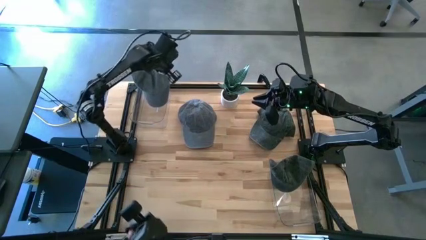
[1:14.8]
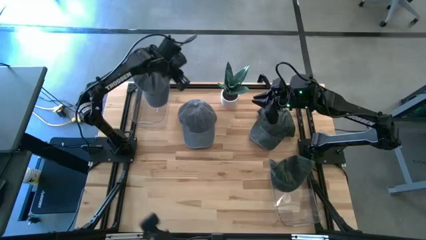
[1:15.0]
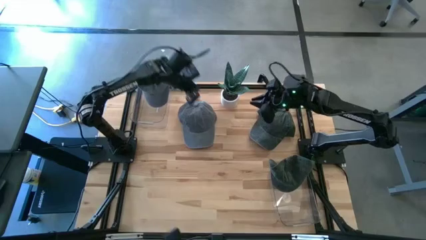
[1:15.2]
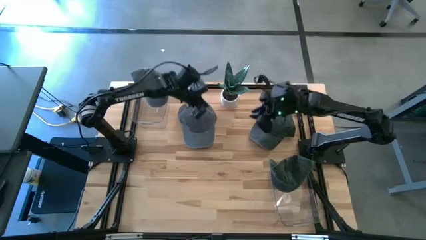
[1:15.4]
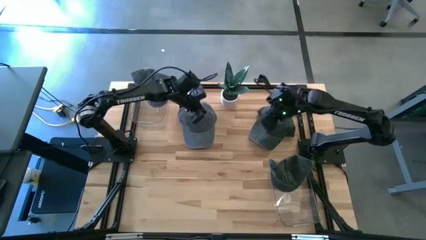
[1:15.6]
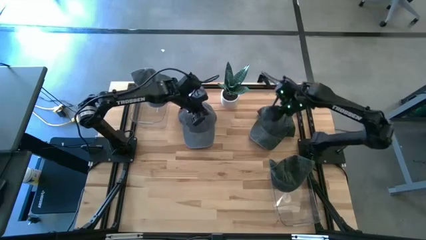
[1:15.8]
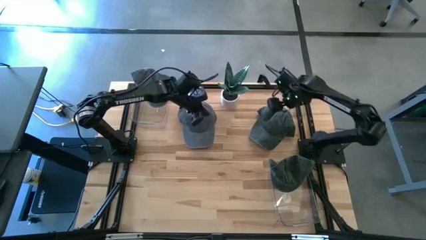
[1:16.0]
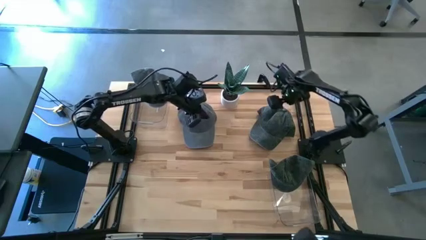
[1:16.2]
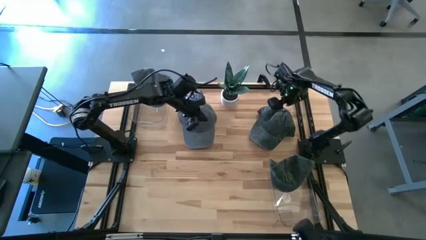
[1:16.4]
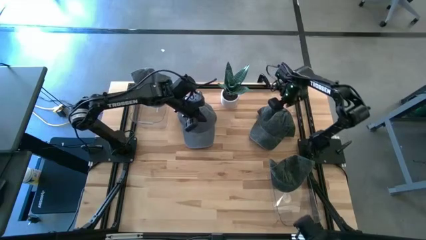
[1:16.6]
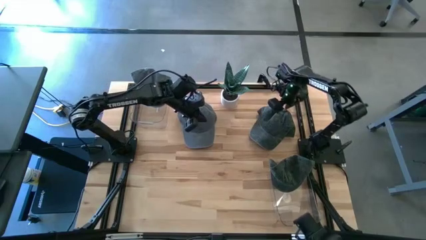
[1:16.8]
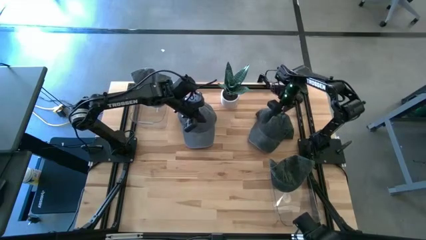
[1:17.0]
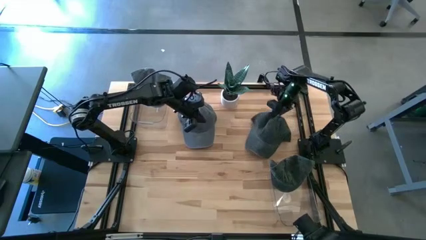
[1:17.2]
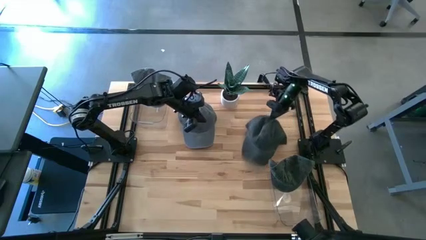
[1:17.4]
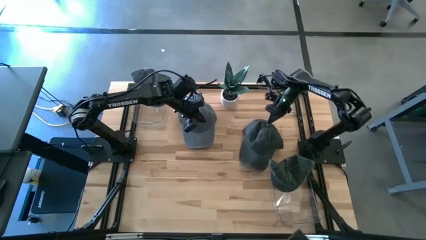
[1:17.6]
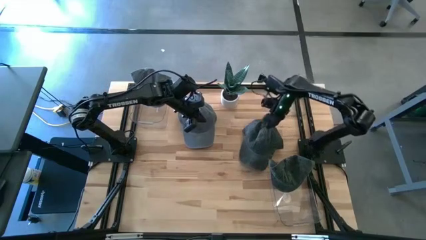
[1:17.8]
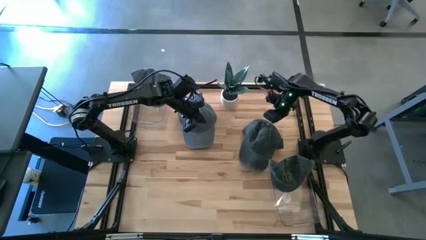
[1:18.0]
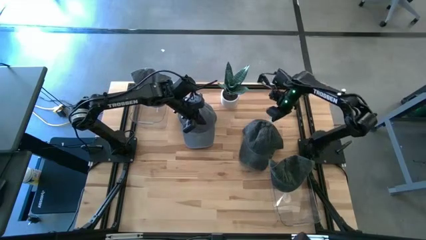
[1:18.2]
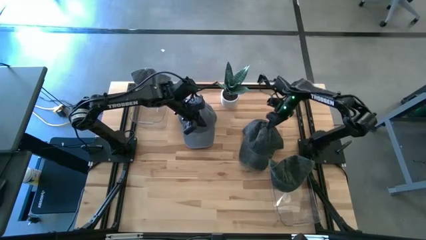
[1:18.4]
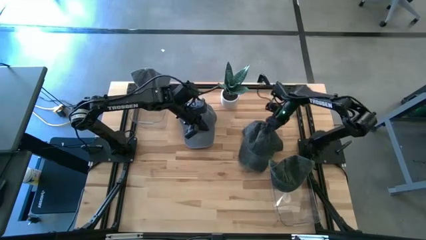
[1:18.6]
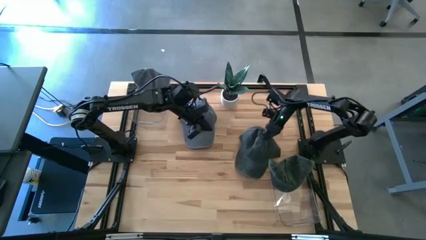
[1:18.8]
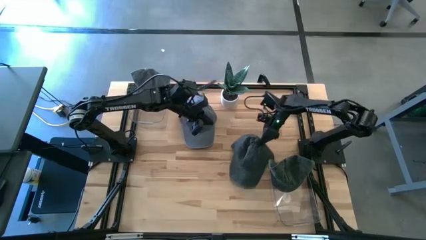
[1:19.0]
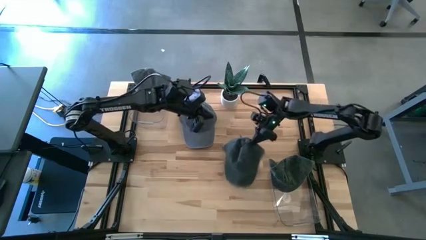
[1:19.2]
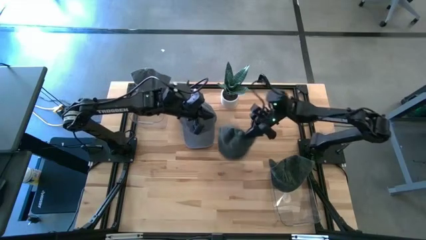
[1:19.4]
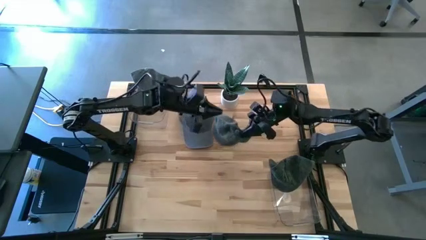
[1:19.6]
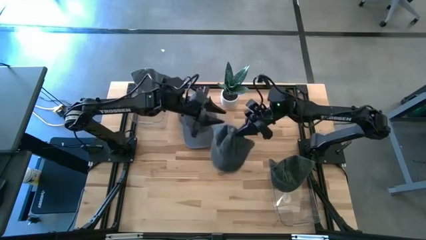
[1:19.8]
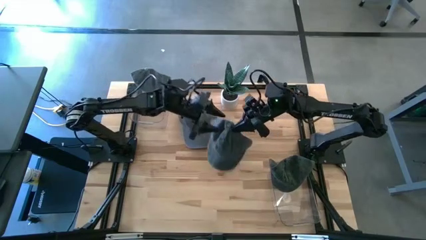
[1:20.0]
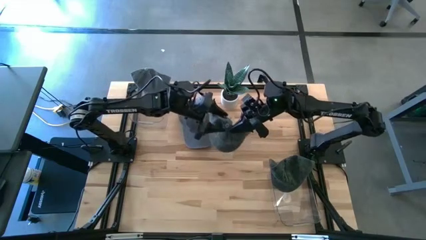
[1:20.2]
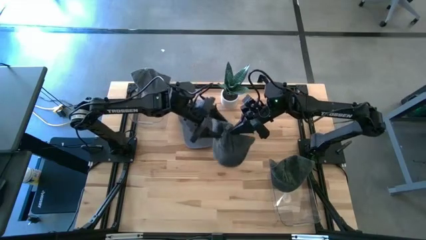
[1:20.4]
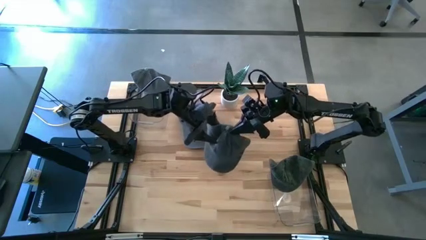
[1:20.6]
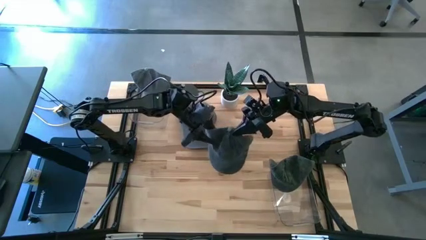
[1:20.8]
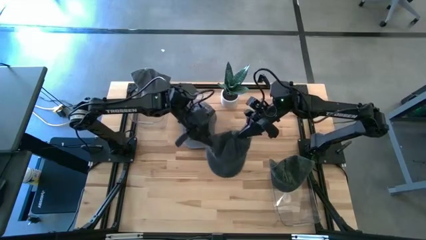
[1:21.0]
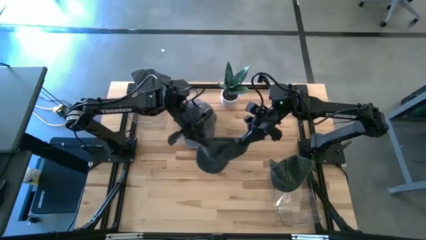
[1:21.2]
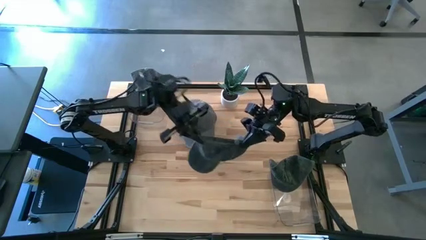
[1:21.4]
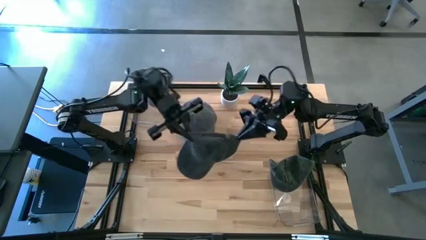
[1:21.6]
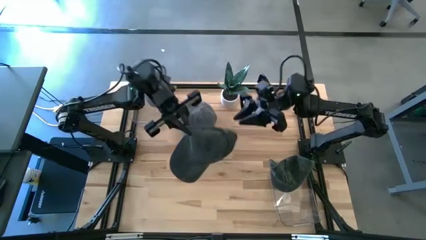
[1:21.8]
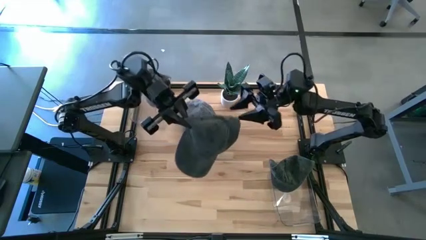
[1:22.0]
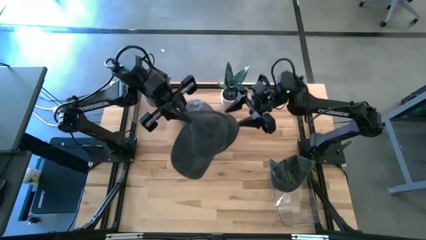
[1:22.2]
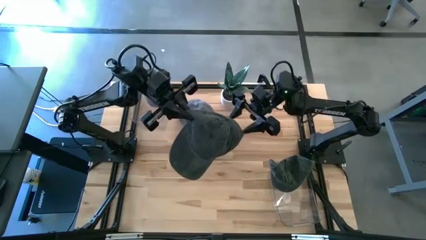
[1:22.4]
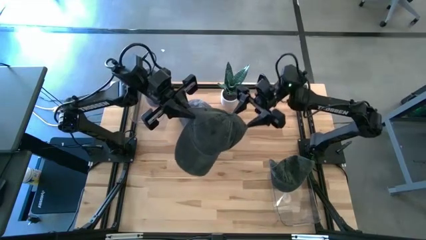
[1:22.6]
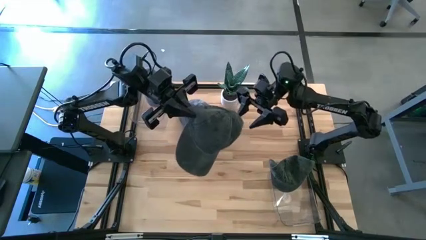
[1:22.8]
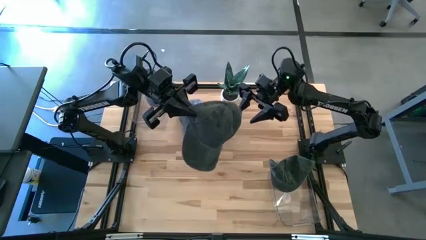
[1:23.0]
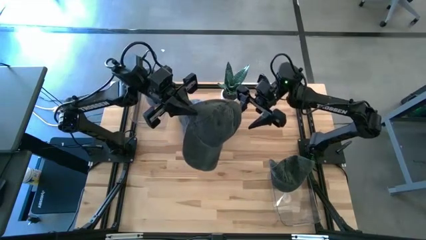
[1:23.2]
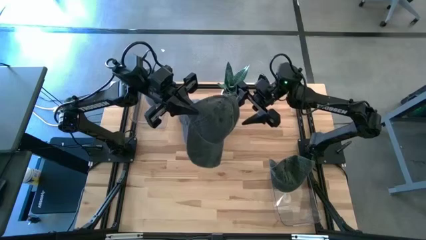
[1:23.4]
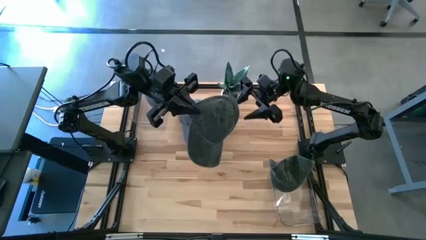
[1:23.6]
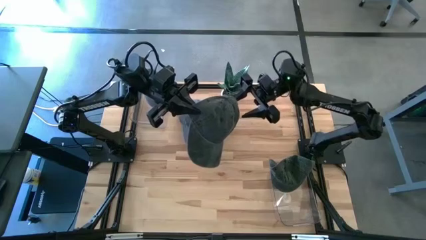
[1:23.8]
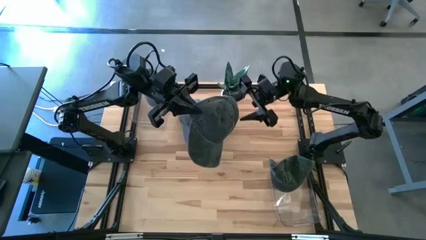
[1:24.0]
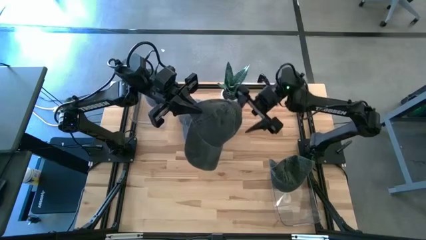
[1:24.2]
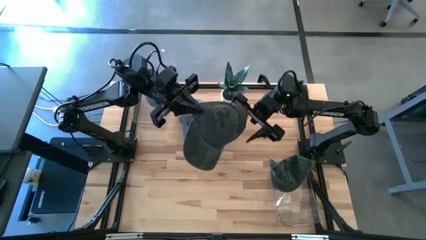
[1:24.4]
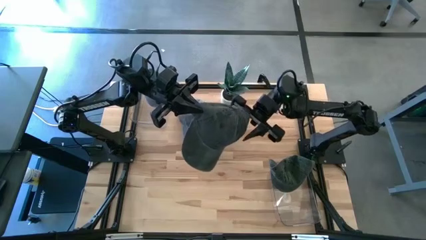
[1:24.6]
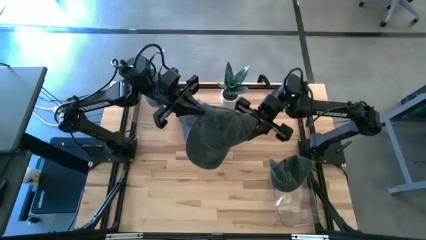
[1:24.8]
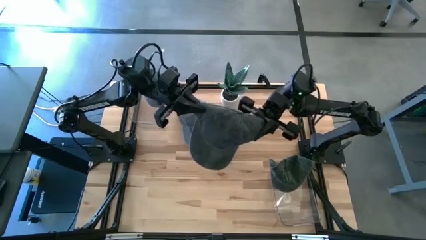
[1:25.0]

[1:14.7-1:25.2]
Task: Pick & Place hat
Put the black cap into the bottom transparent bin
